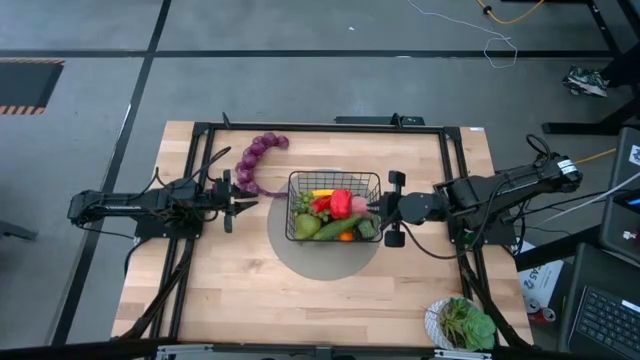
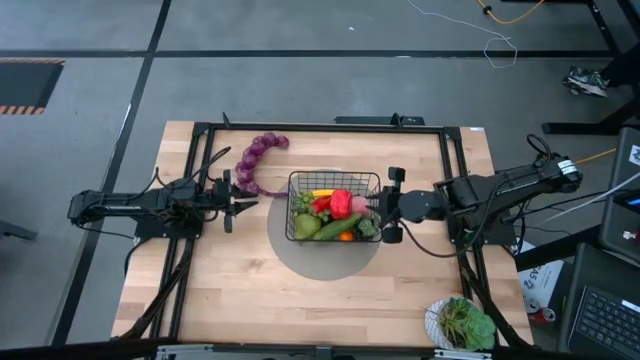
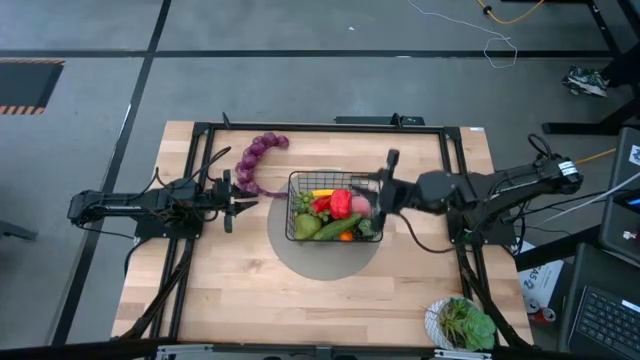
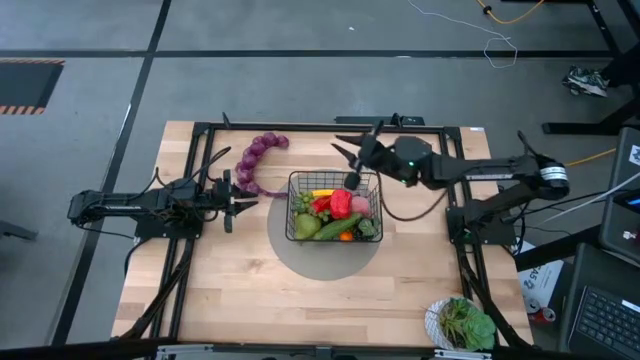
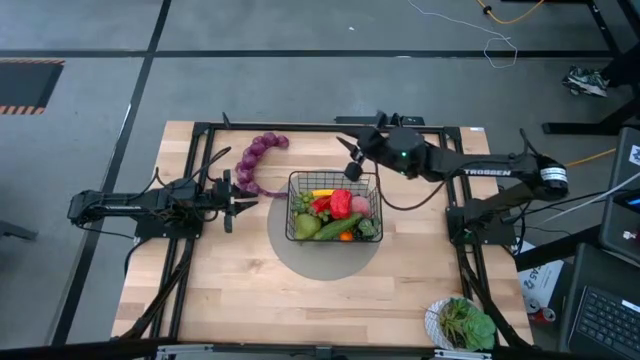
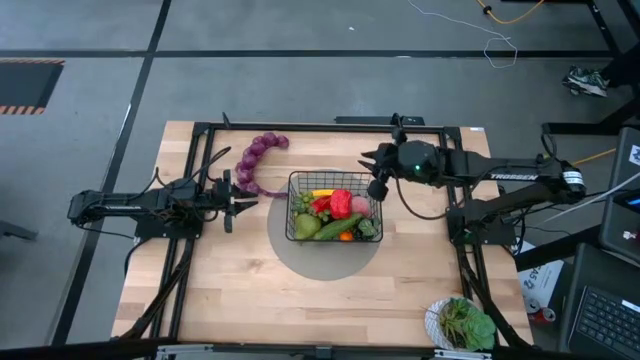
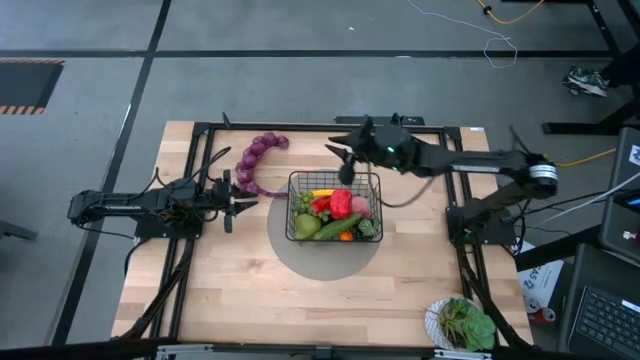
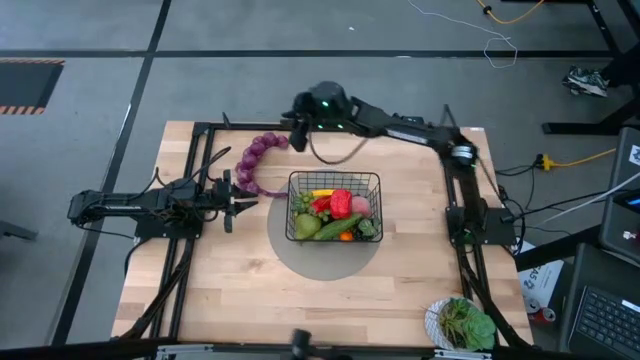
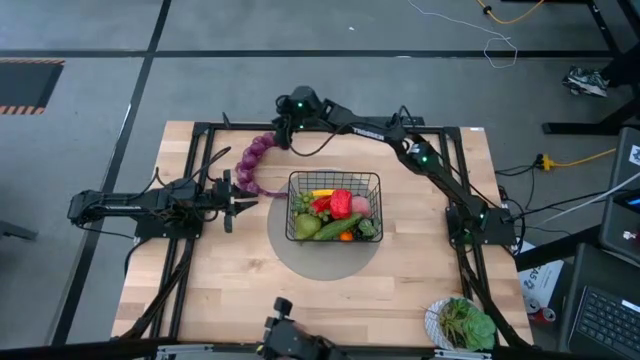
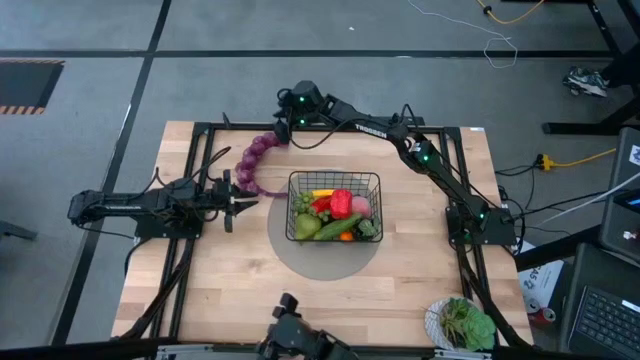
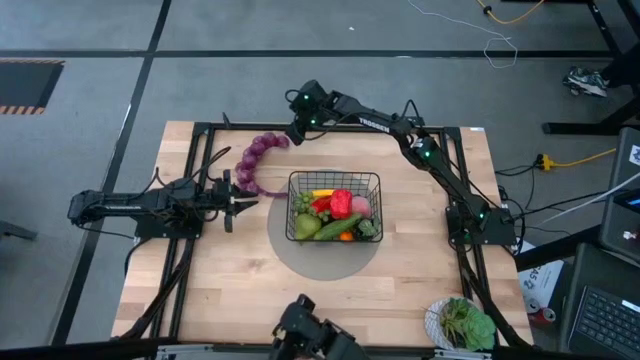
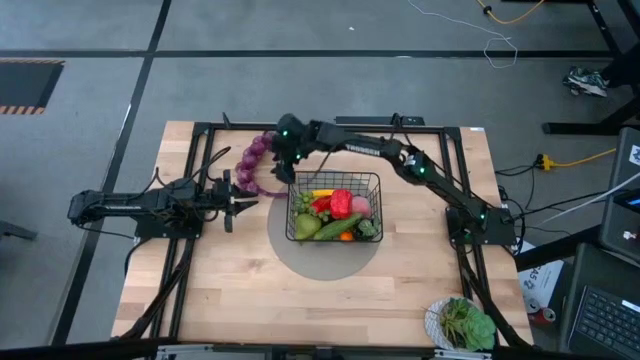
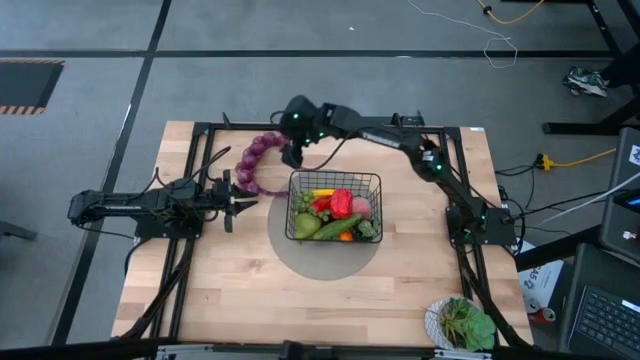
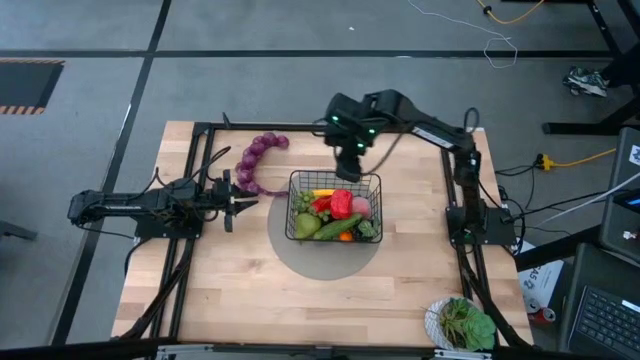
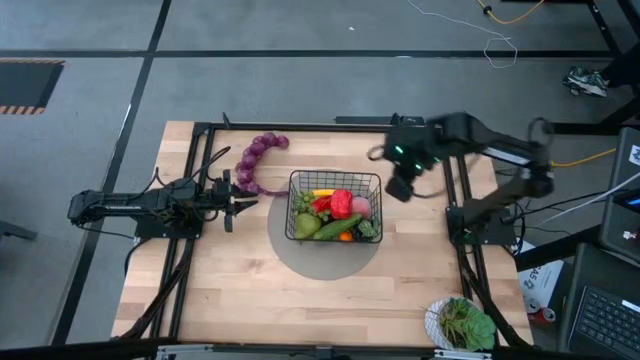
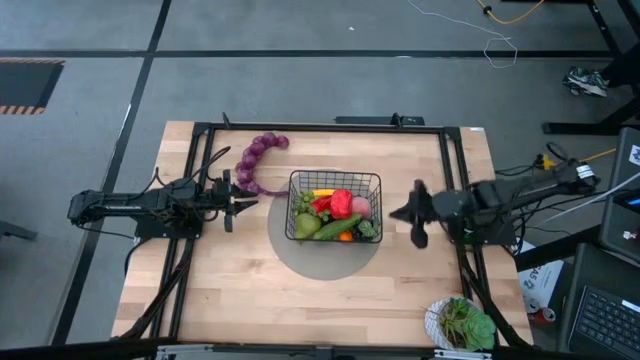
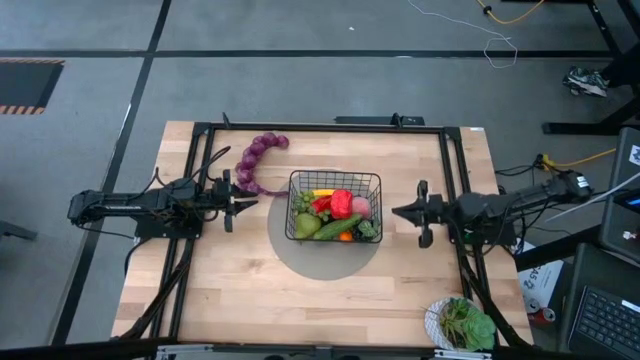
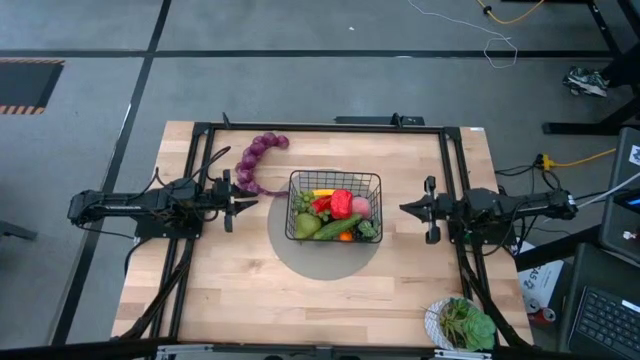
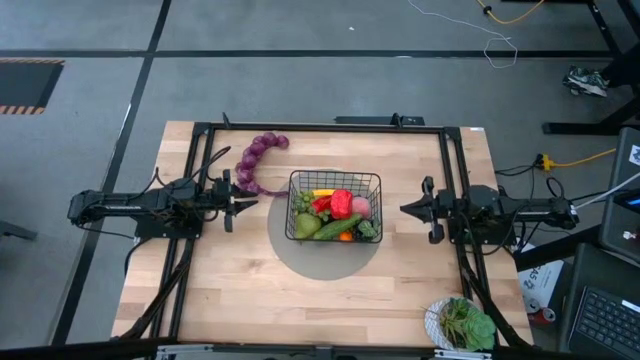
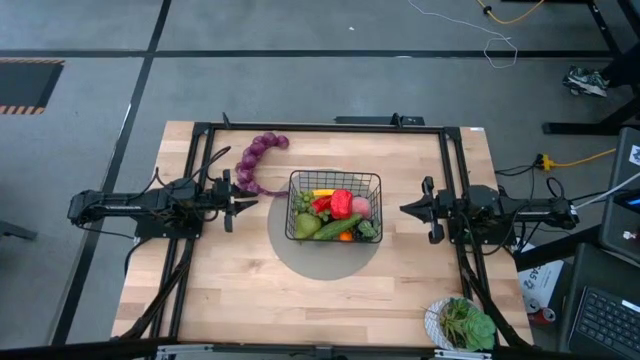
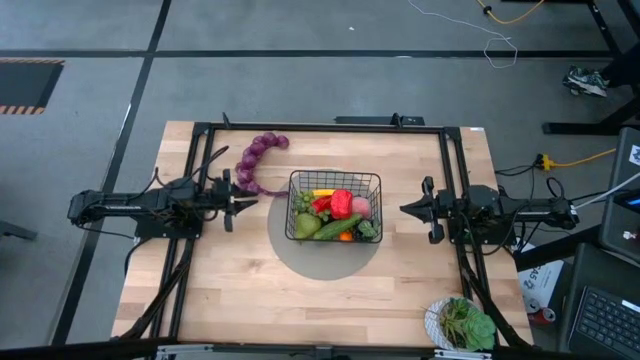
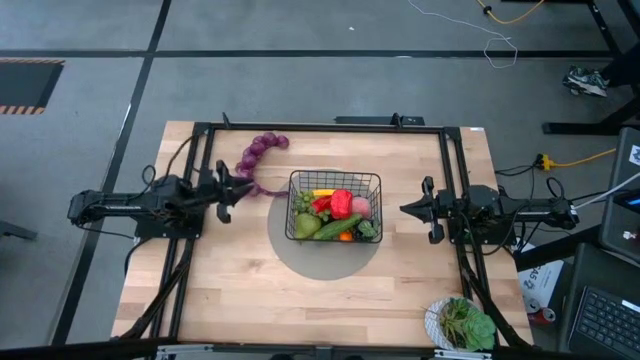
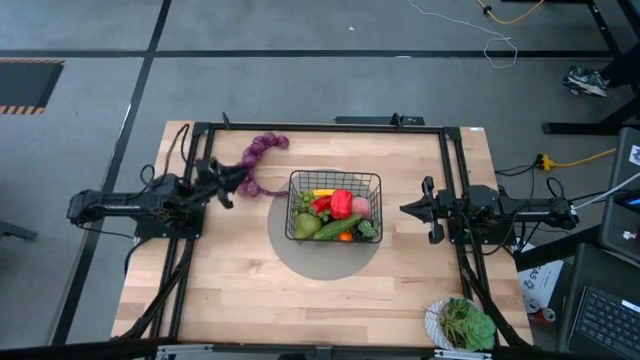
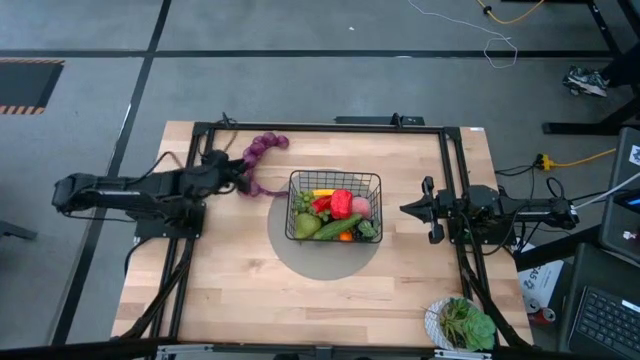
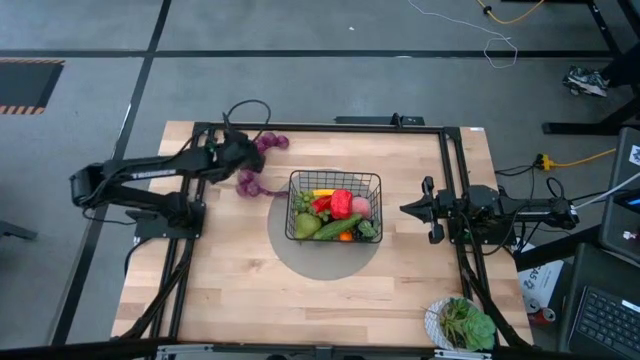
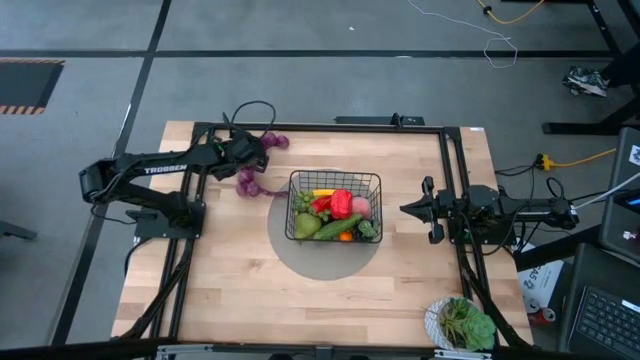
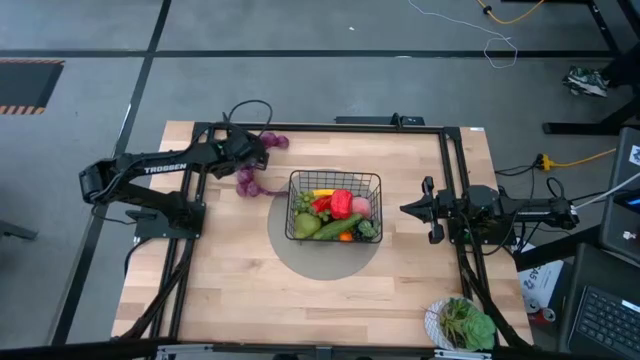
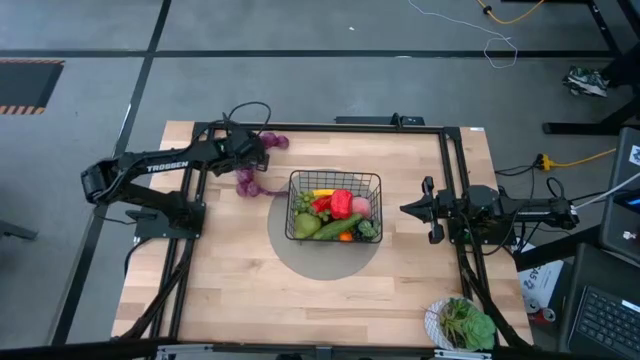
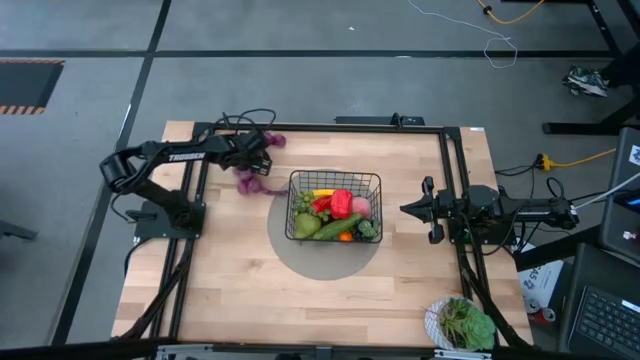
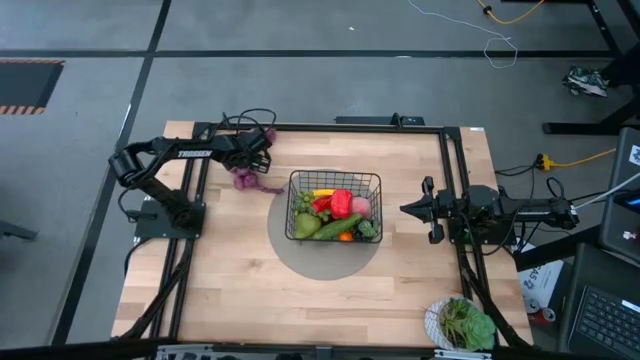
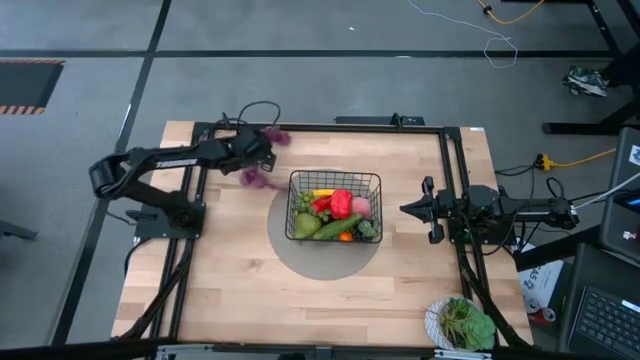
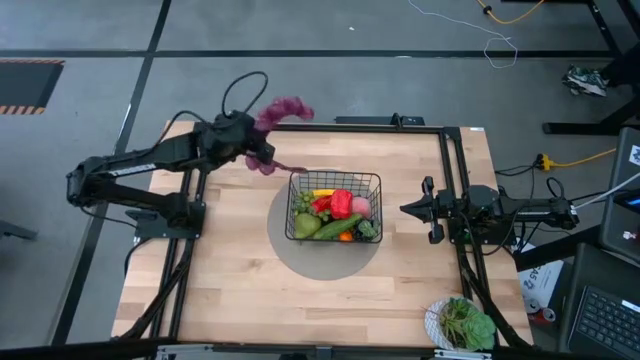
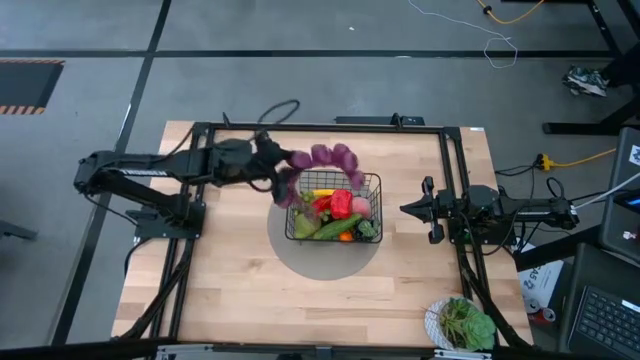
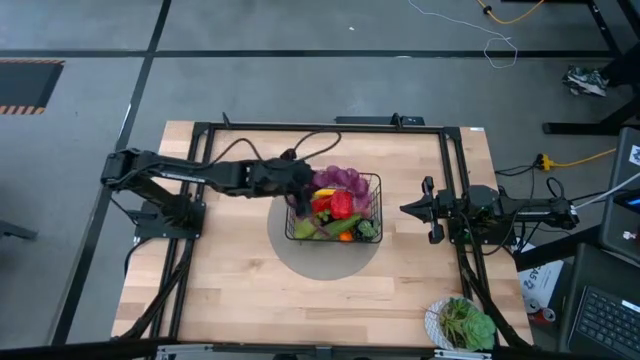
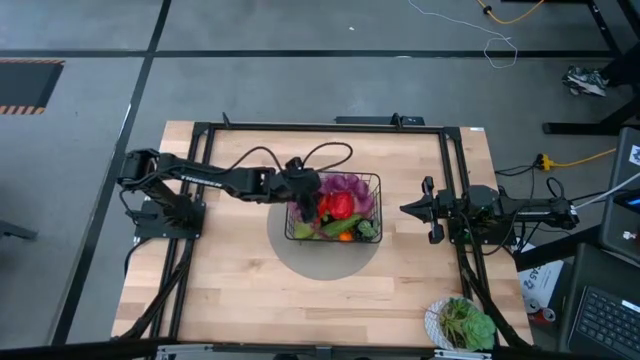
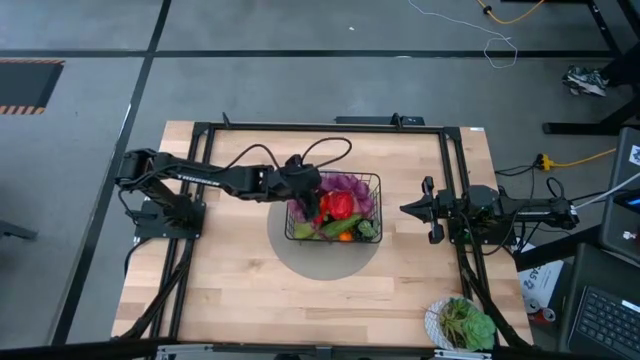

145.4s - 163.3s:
Task: Build produce basket
Put the purple garlic into the wire basket

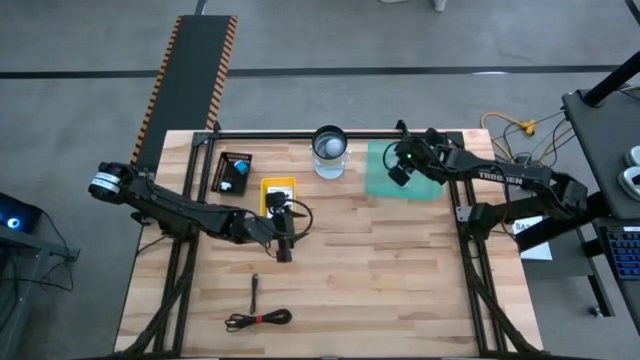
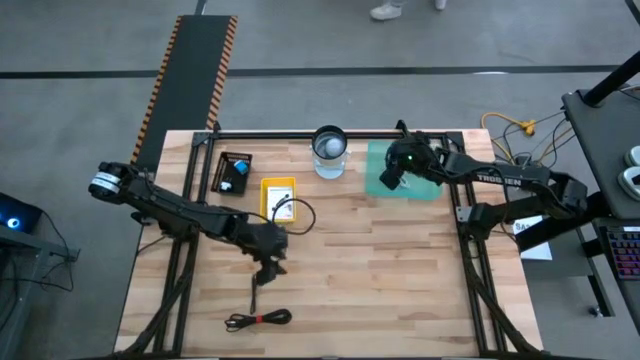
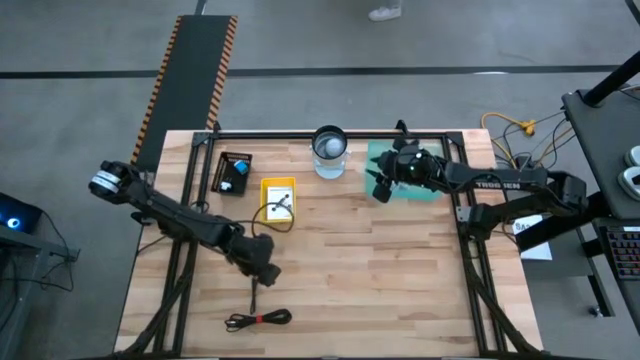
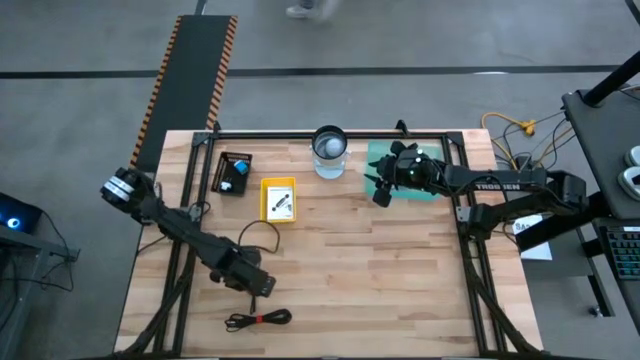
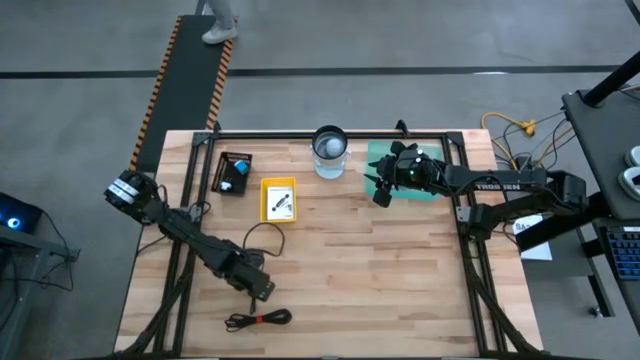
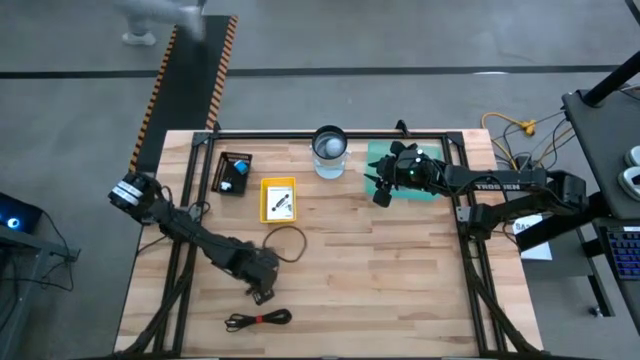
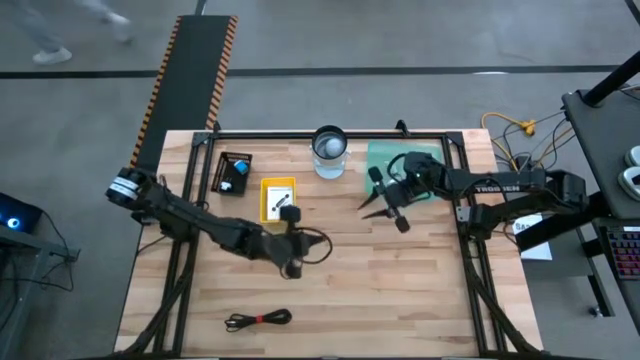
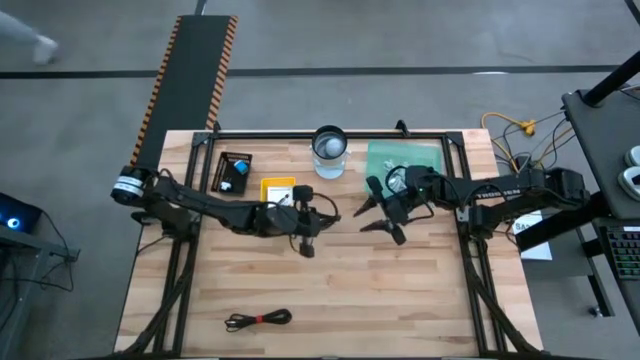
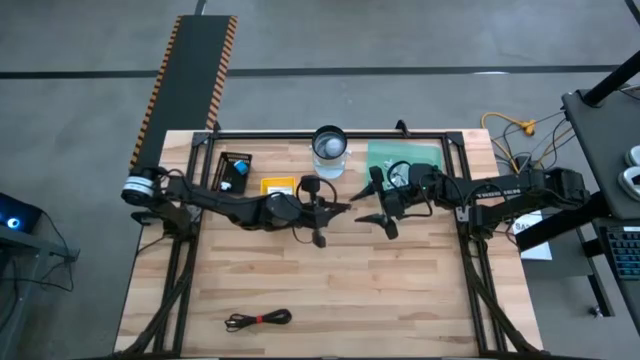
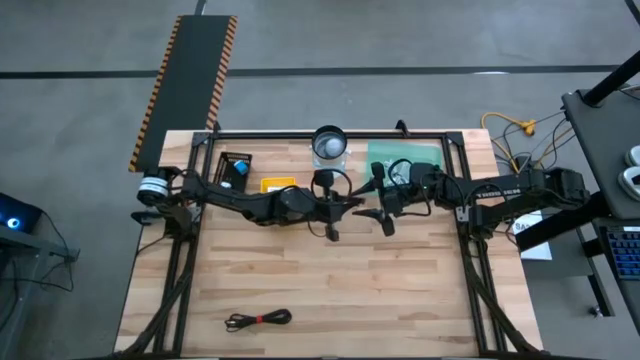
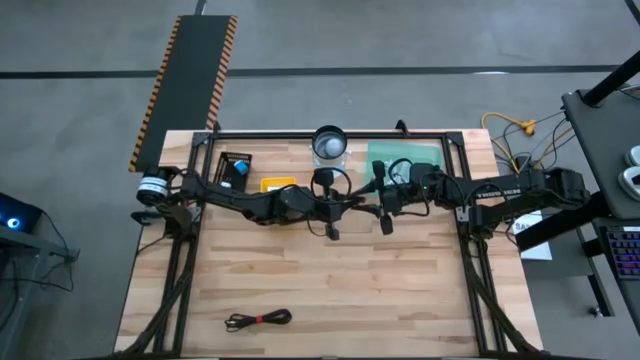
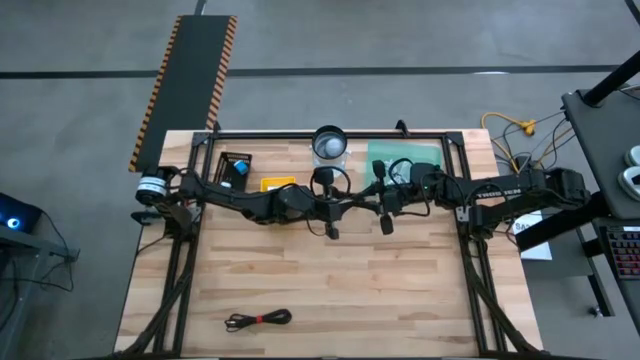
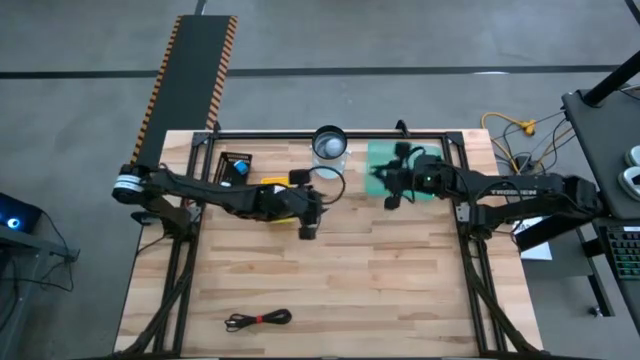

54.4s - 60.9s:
Task: Pick and place items into bin
Put the top black cable charger into the light blue bin
